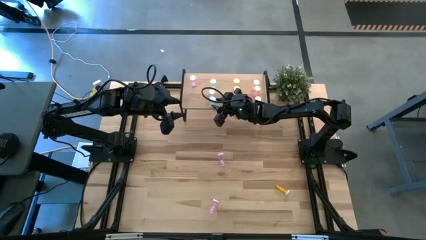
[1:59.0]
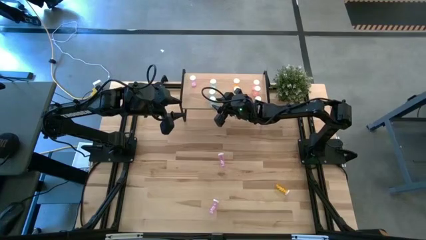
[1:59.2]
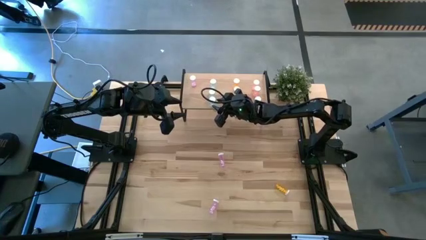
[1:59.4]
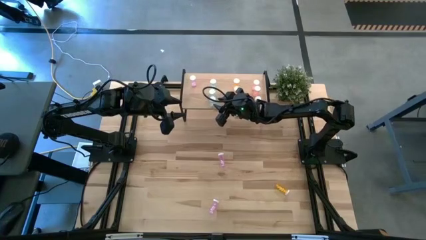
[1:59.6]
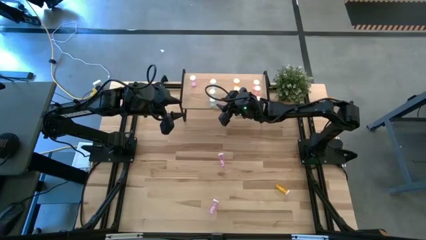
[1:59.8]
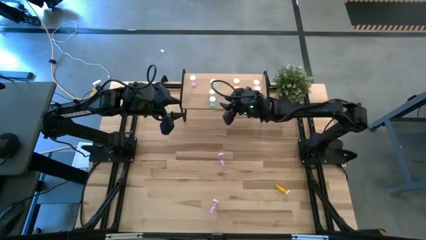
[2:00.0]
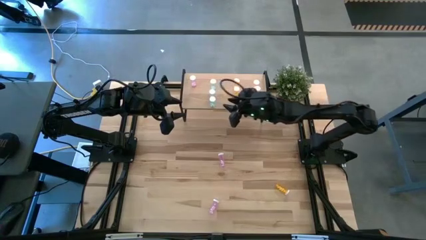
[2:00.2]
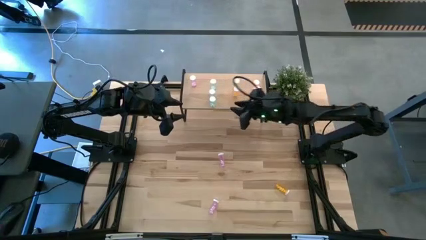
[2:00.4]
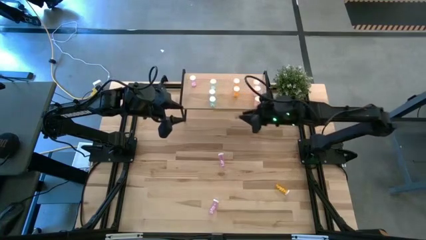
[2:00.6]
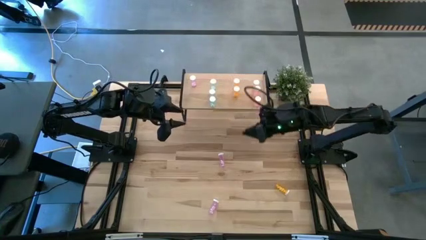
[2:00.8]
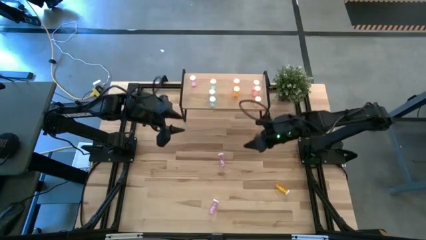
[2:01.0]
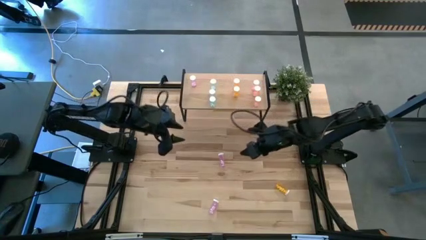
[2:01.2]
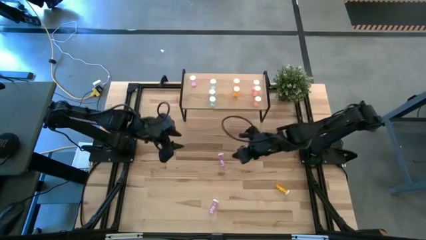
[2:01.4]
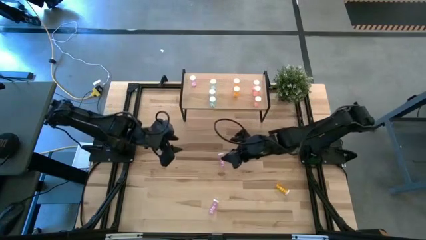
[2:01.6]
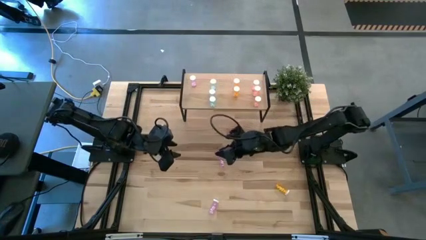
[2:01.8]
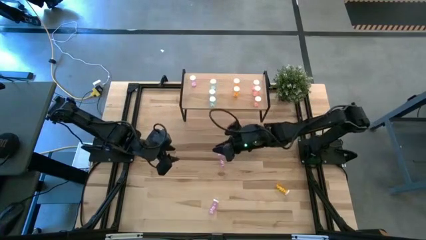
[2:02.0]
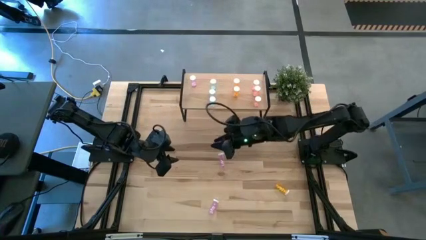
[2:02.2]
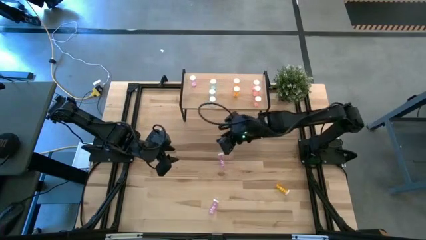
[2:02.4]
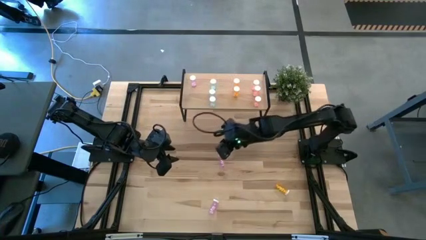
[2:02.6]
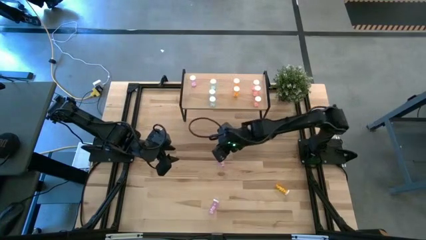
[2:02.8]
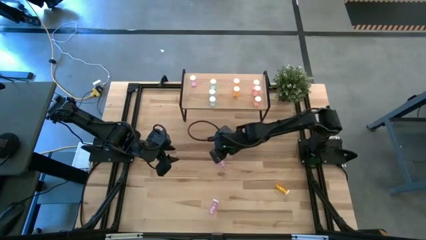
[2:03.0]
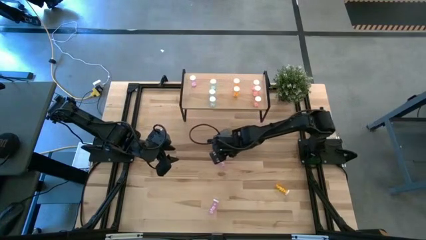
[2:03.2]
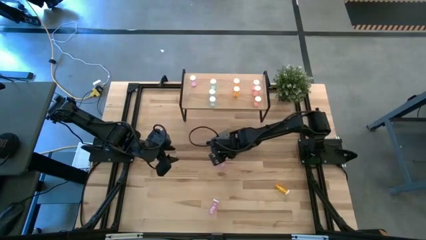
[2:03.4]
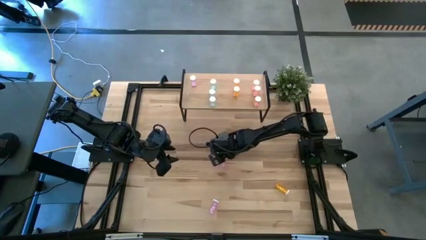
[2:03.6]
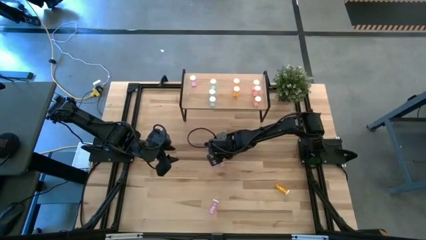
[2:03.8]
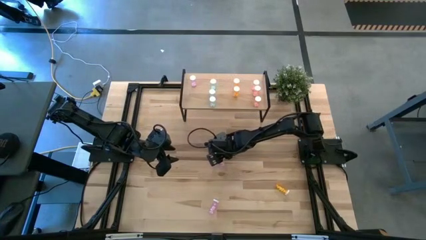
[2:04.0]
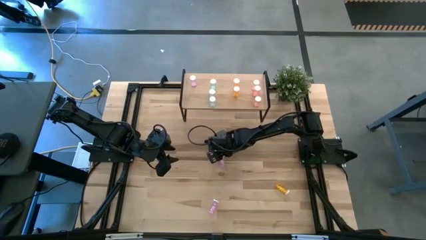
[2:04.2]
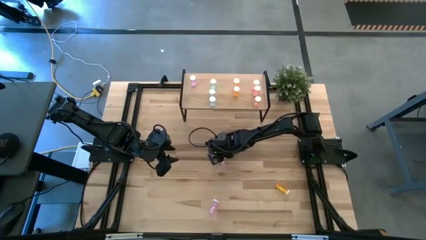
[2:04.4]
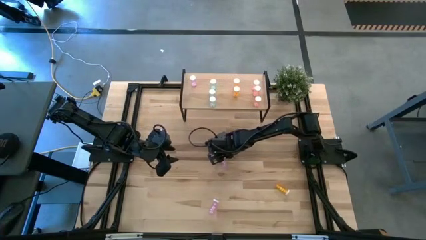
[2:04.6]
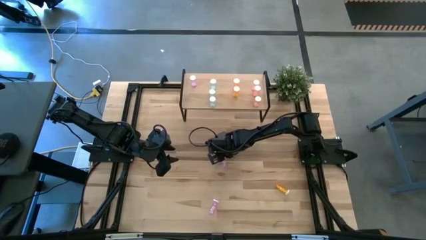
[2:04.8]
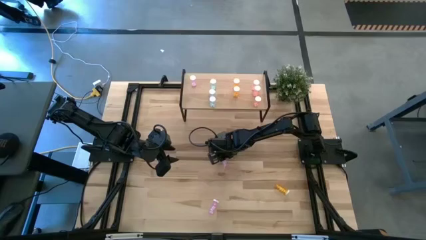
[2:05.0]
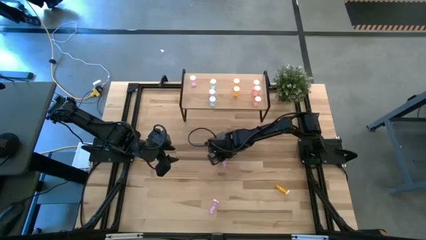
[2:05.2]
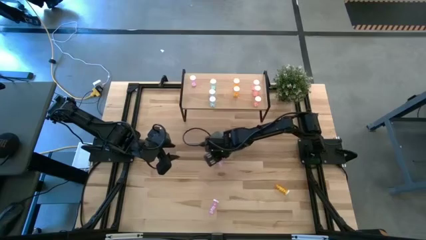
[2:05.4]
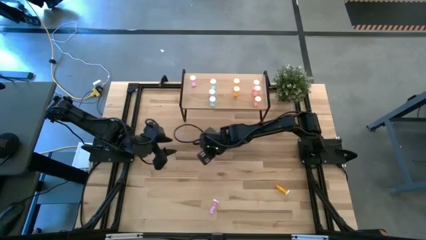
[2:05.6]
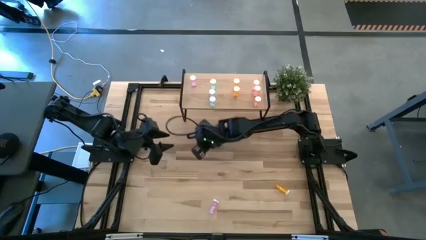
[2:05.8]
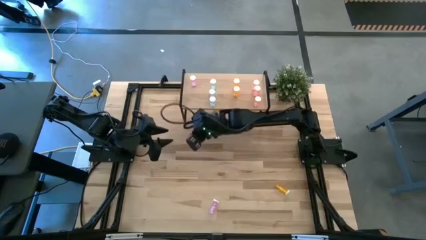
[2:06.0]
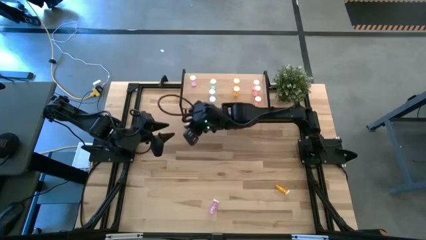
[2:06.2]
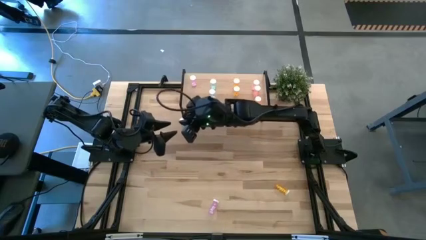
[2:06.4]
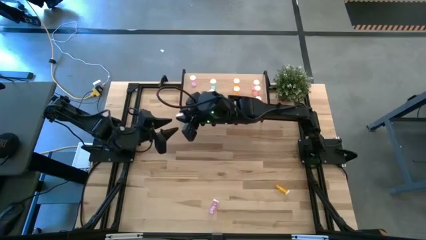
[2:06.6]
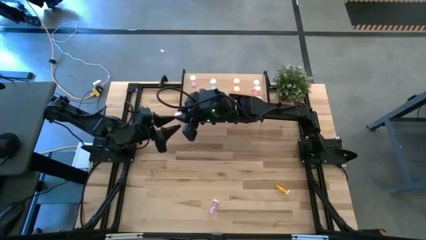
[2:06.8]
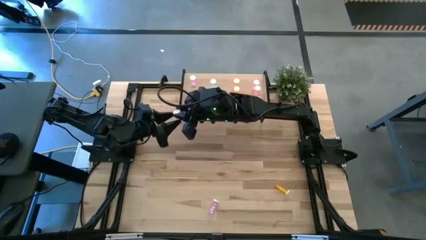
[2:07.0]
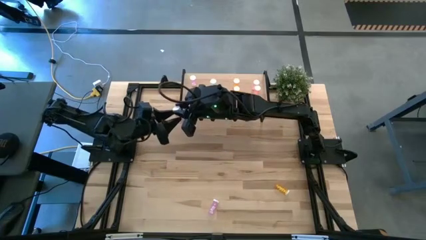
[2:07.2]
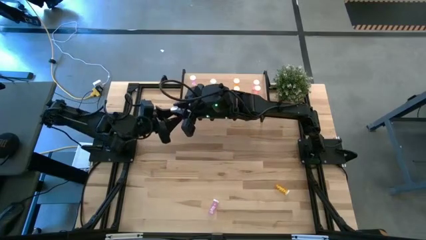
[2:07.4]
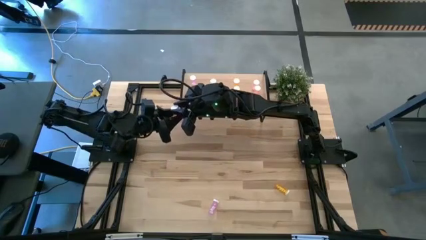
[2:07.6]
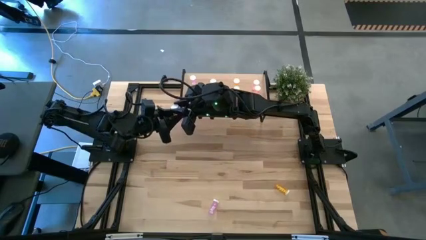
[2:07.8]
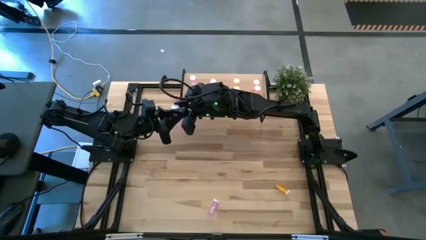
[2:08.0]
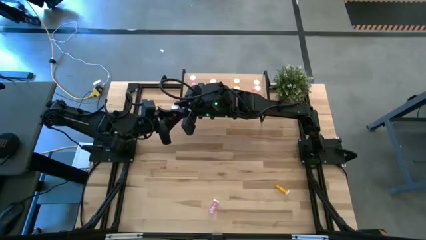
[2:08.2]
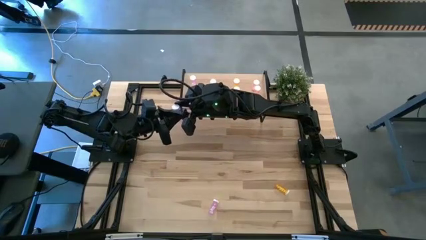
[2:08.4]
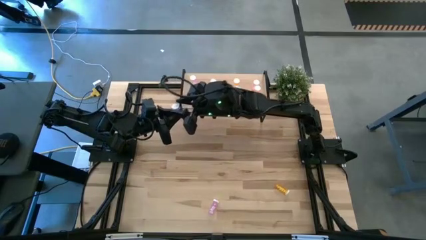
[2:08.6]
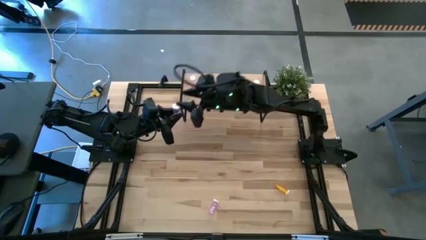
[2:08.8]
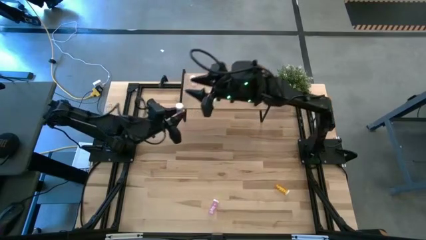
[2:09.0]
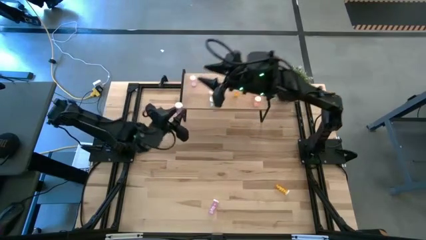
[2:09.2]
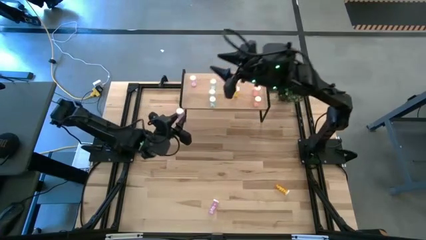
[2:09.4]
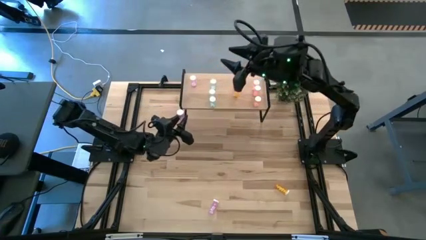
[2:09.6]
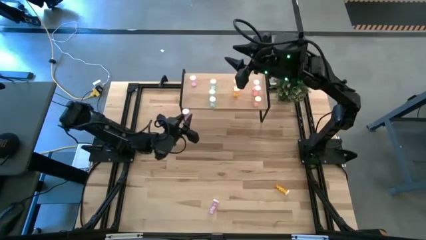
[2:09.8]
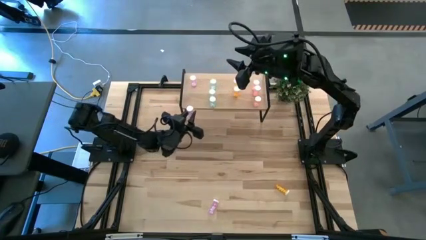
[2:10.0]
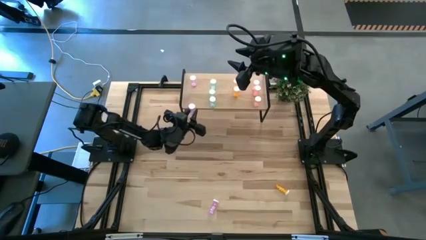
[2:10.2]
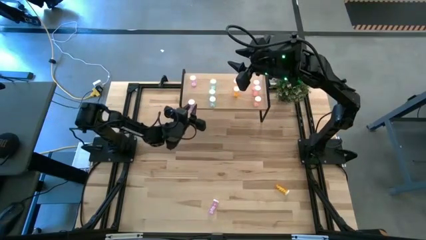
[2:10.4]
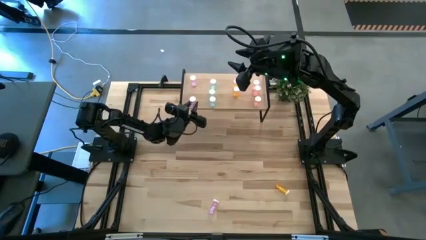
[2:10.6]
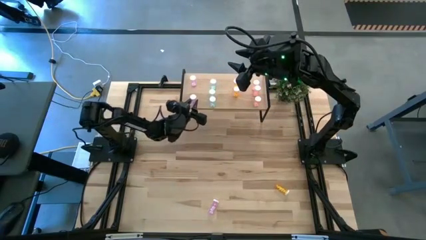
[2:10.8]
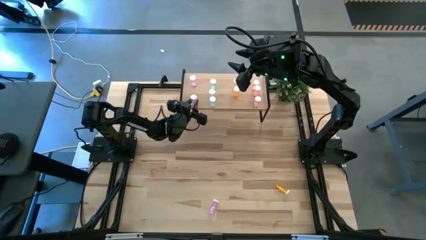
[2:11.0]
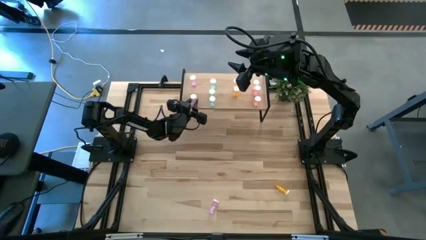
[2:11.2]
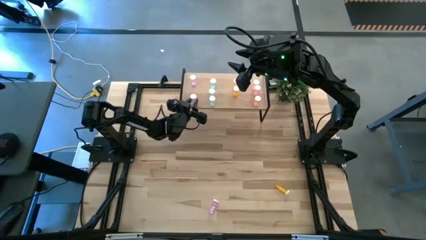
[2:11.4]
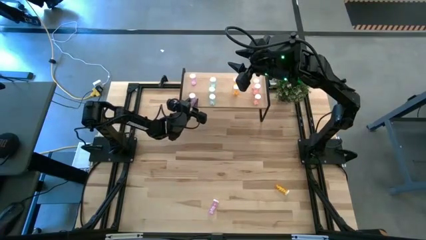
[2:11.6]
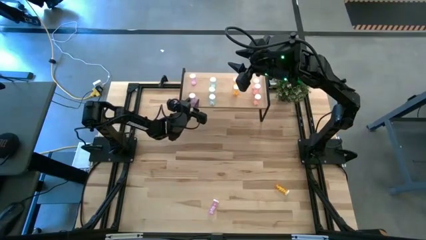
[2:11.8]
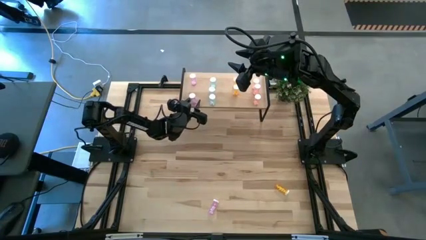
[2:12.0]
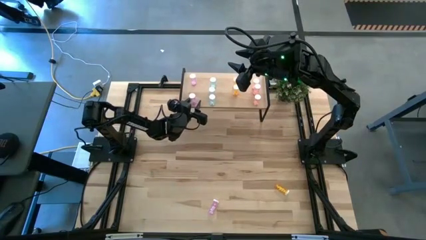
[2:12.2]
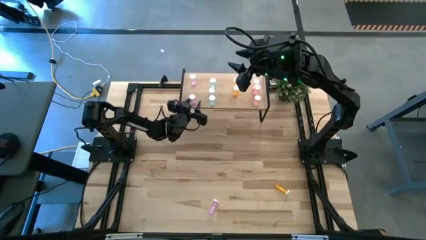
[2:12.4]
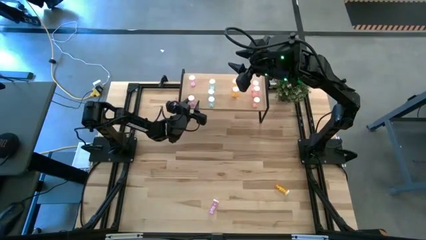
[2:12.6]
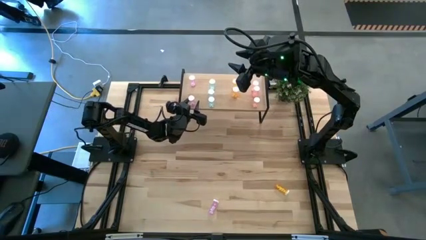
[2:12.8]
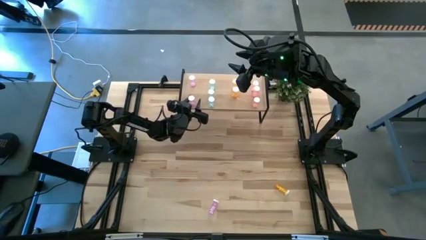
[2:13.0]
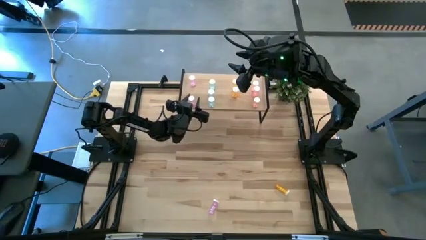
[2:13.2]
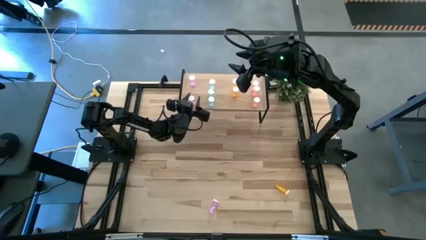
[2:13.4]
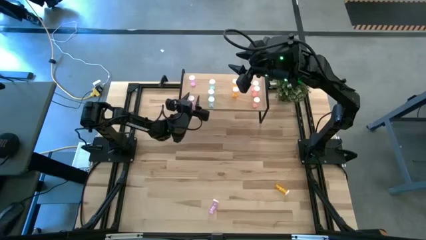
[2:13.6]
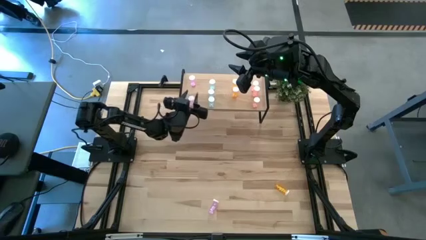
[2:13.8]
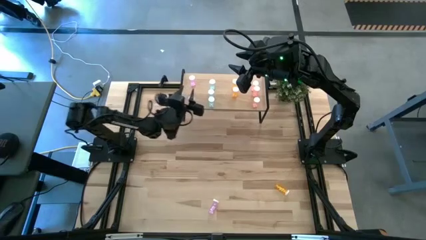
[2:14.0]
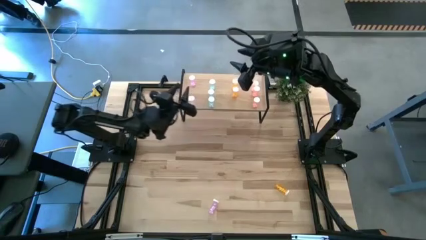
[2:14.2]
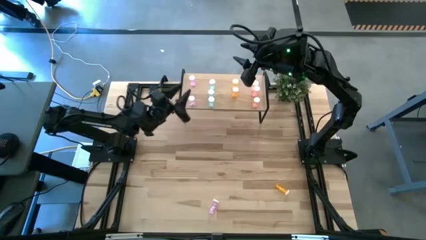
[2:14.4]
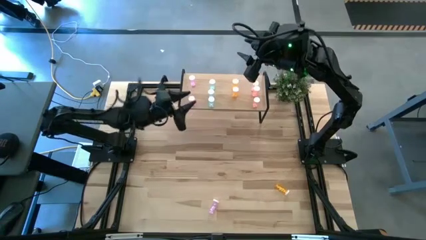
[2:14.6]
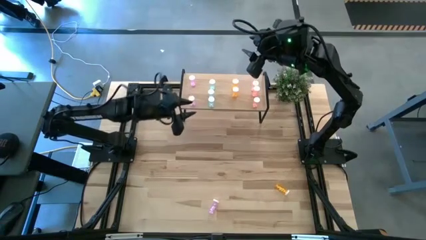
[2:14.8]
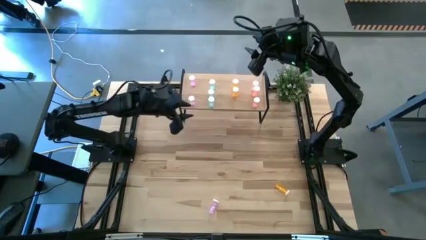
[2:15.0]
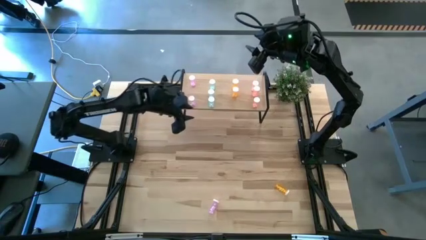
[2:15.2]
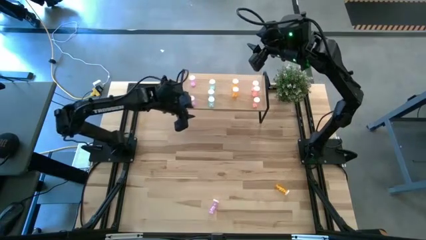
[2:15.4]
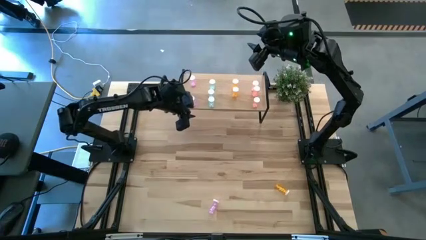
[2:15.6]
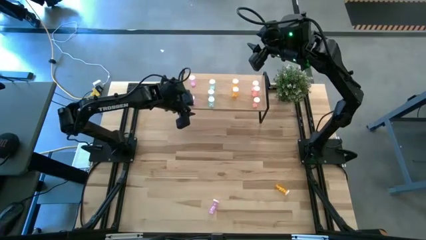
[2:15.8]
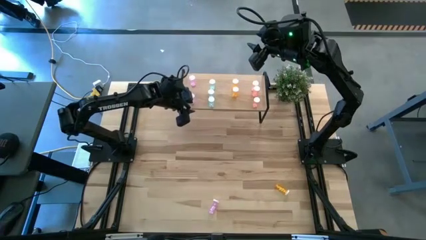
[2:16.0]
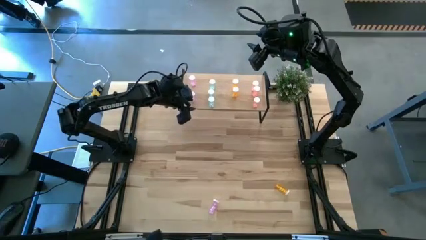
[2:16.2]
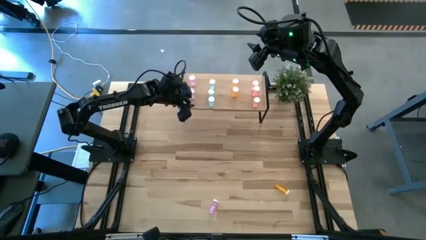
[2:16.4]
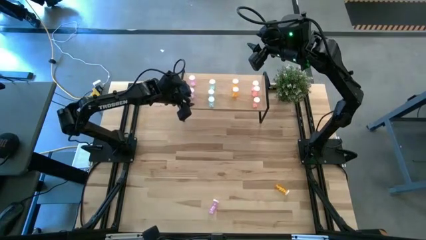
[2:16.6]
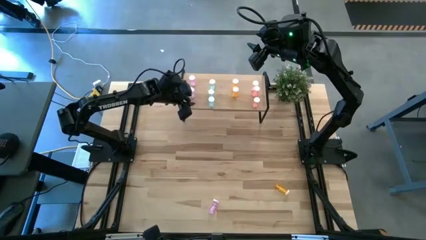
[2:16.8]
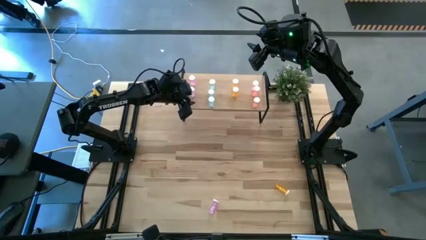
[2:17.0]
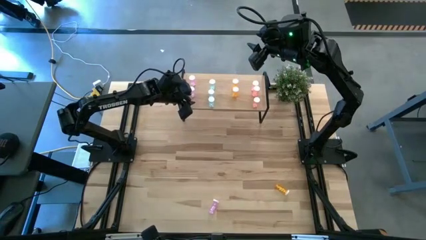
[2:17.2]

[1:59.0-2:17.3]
Task: Pick and place medicine bottles onto shelf by color
Put the top violet pill bottle on the shelf aligned with the other violet pill bottles
